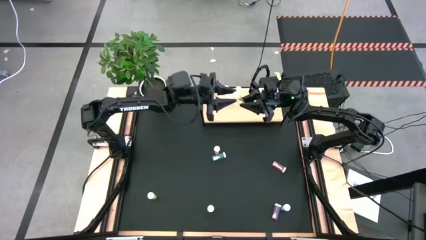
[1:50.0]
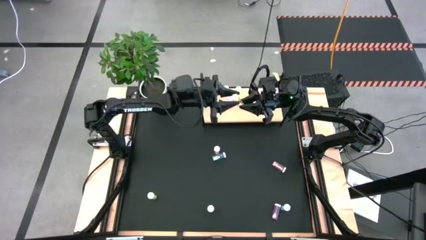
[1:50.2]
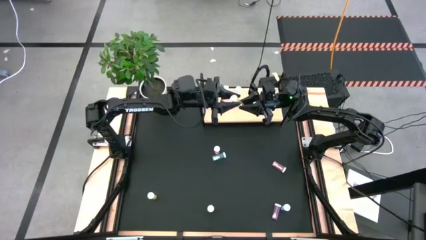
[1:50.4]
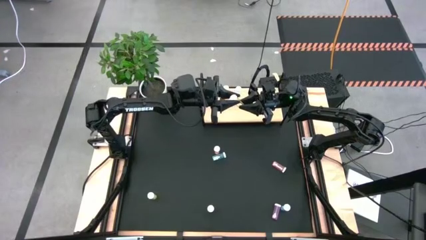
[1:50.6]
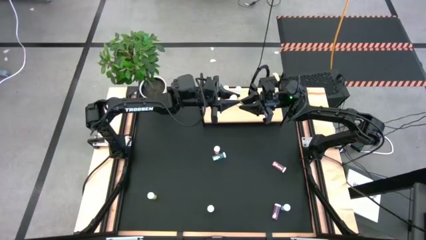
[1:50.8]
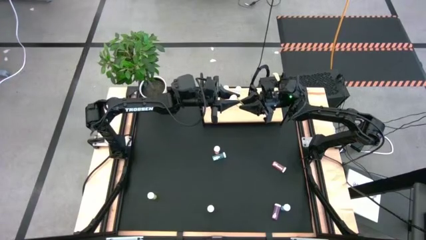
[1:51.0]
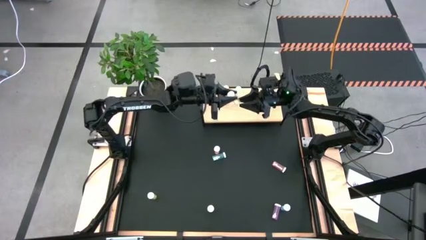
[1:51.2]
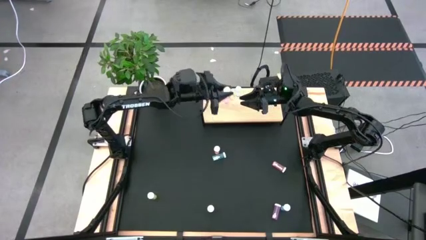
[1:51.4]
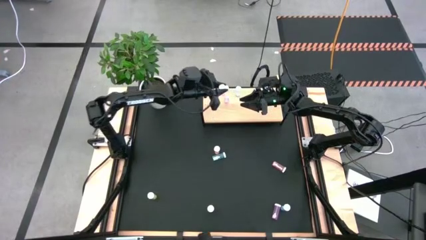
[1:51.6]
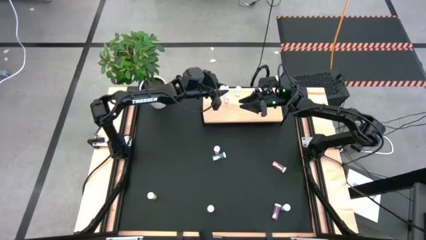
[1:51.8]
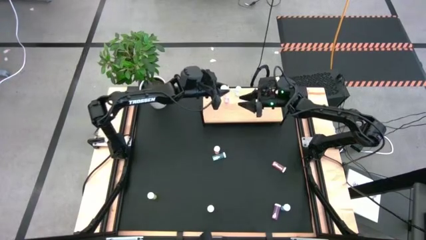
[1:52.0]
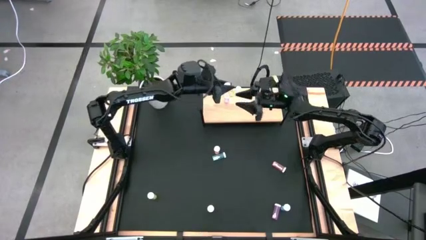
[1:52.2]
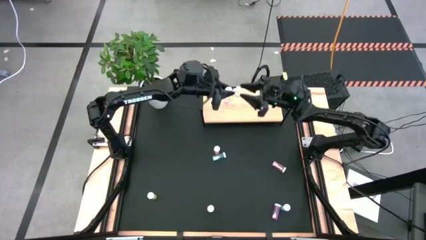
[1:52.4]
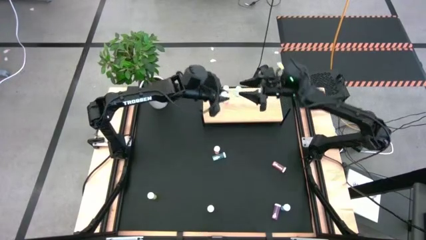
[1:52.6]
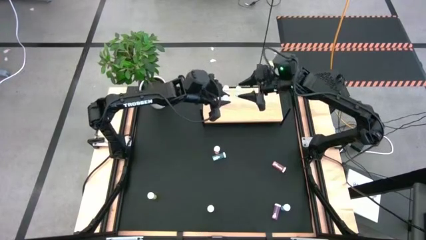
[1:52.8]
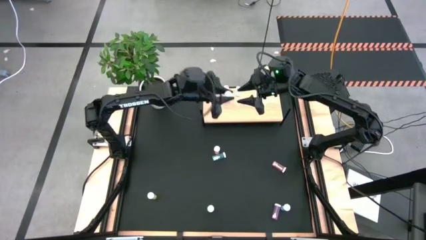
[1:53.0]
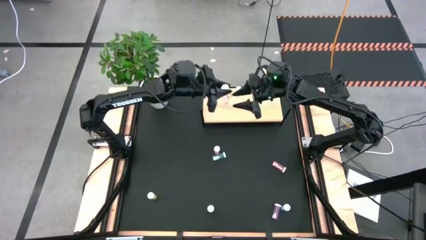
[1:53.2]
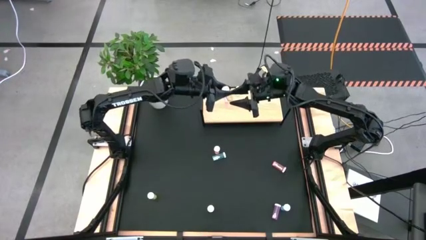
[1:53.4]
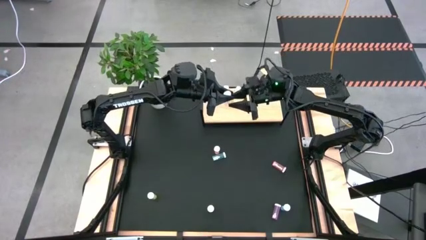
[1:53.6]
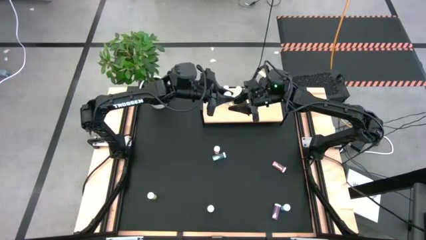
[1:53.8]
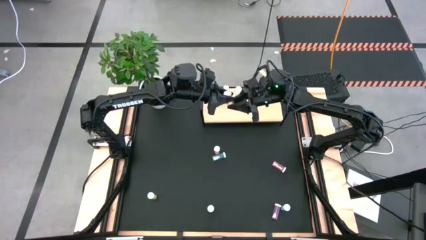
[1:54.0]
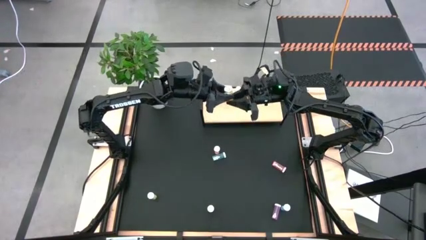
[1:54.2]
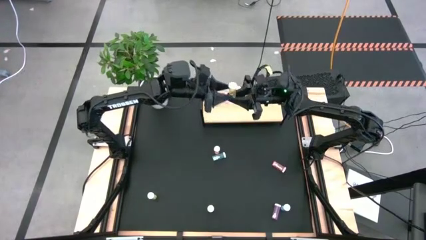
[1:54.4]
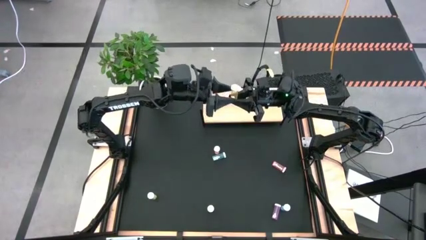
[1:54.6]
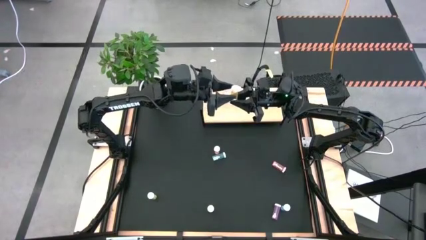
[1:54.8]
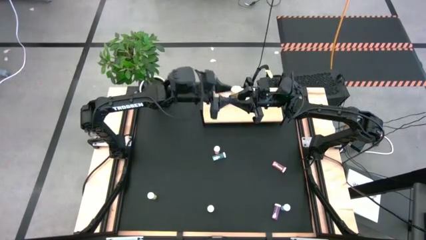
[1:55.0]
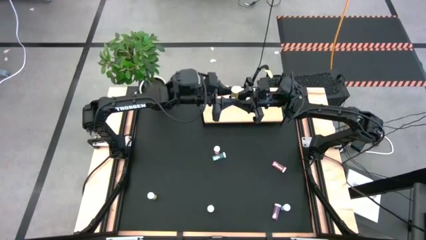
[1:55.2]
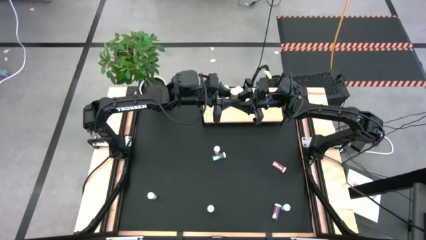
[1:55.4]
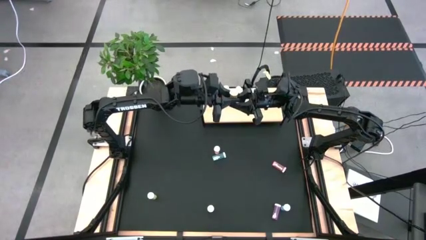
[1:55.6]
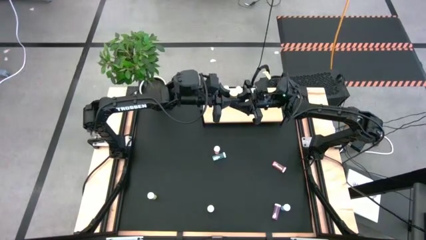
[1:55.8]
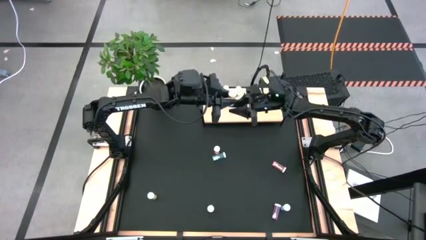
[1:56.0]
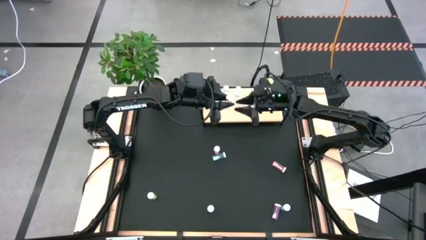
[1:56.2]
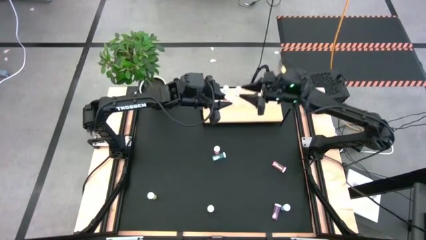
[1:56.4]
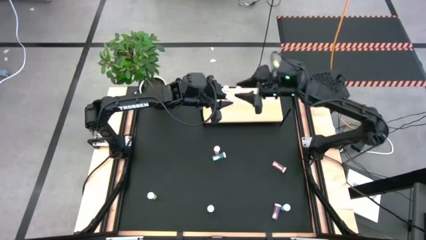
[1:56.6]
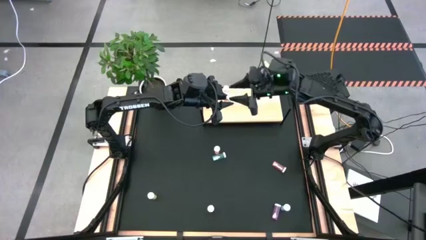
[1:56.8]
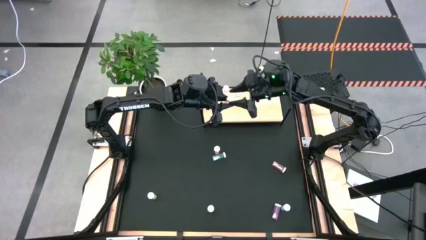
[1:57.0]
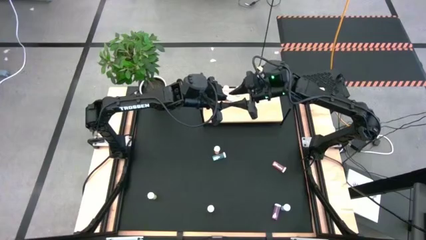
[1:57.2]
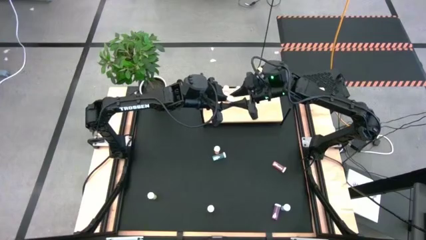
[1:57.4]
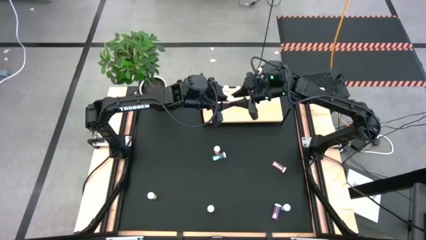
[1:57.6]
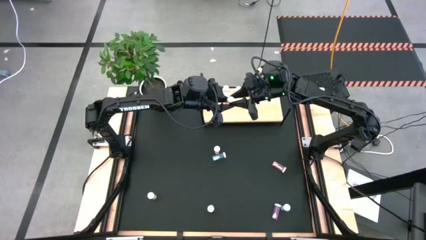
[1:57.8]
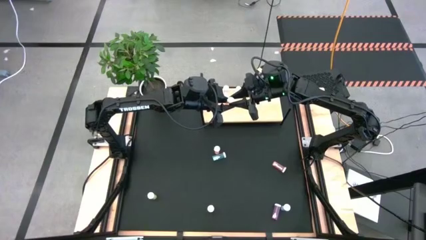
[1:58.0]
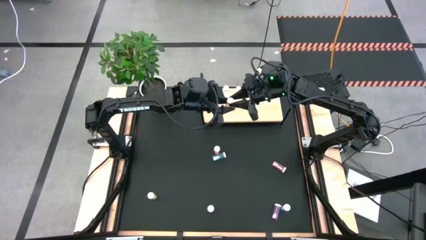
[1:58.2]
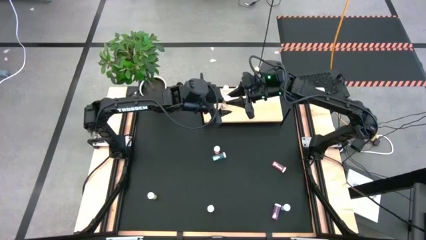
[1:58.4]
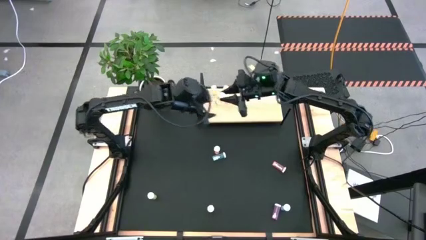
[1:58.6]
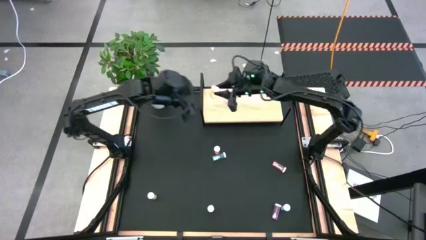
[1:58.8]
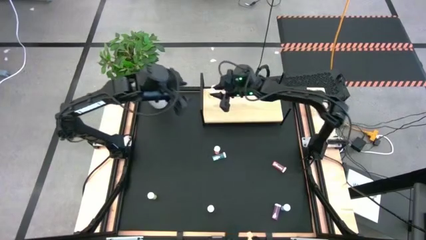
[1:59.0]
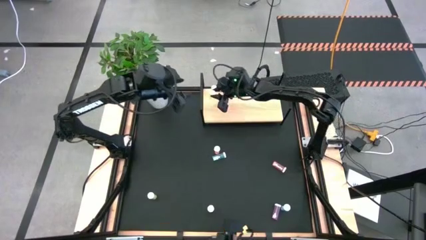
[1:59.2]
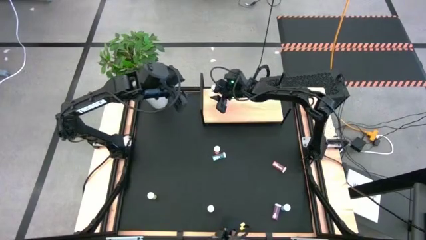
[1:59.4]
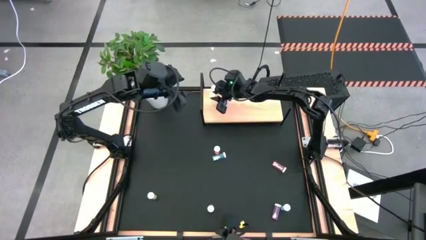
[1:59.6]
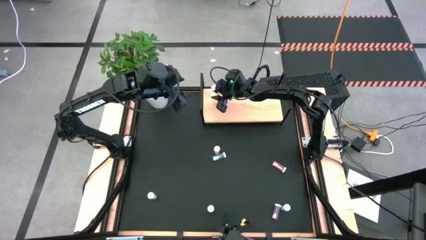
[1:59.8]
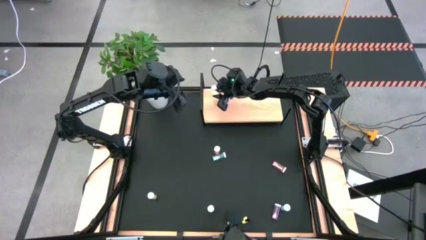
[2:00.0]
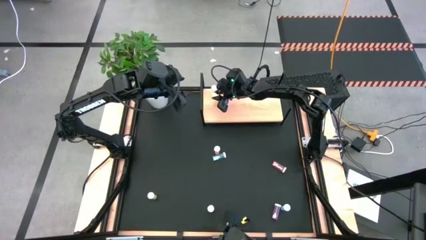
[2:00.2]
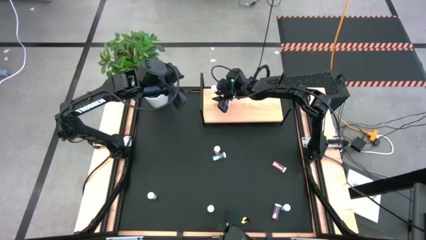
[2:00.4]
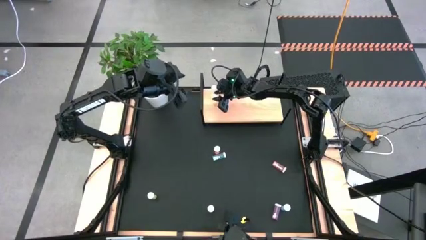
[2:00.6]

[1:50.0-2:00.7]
Task: Pick and place medicine bottles onto shelf by color
Put the right yellow pill bottle aligned with the other yellow pill bottle on the shelf

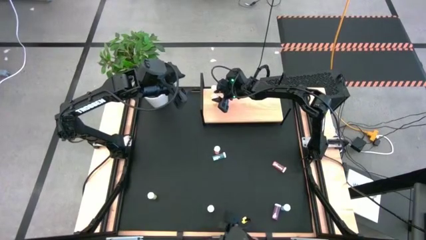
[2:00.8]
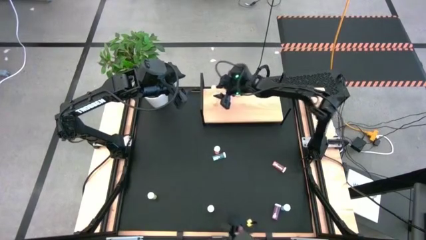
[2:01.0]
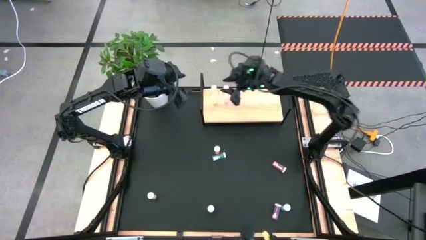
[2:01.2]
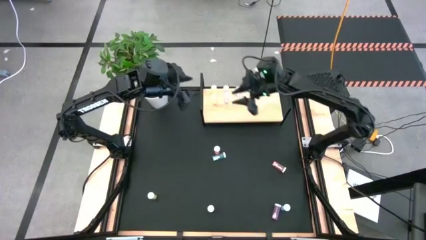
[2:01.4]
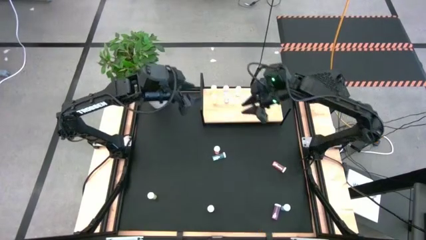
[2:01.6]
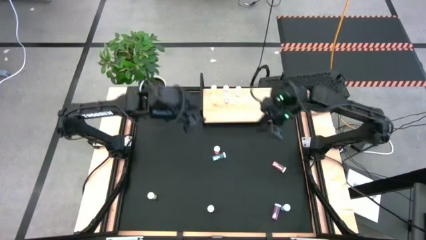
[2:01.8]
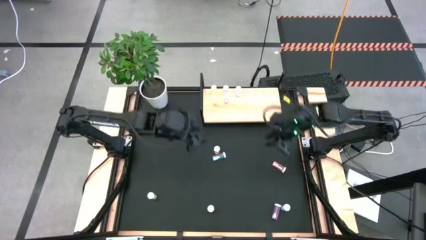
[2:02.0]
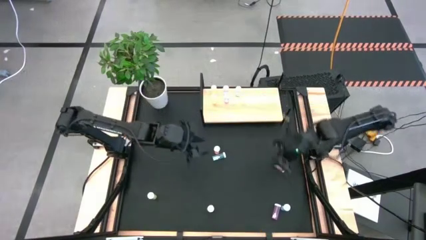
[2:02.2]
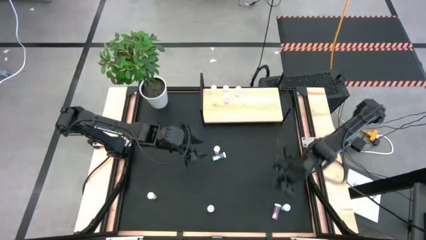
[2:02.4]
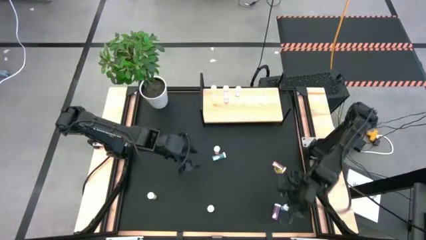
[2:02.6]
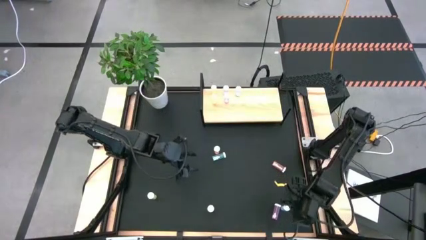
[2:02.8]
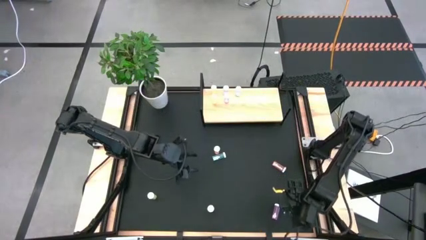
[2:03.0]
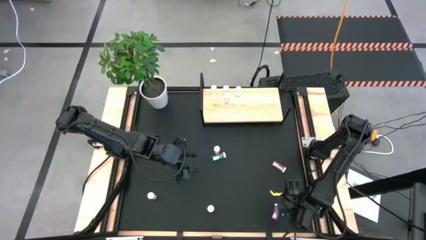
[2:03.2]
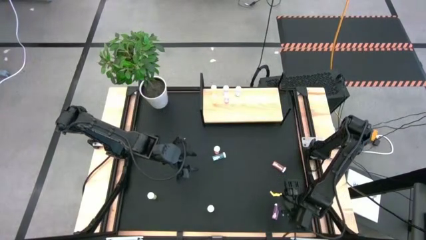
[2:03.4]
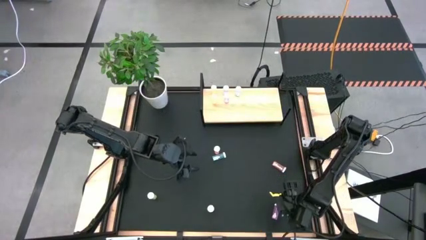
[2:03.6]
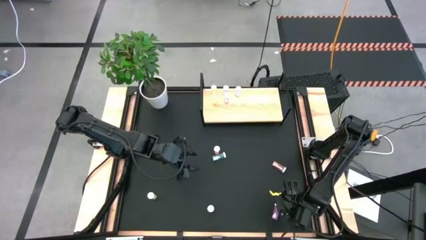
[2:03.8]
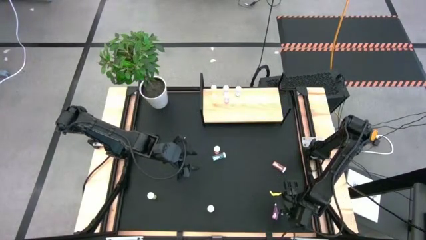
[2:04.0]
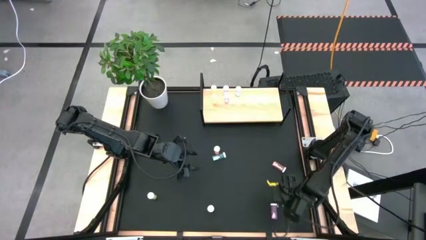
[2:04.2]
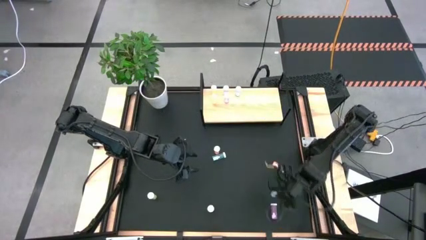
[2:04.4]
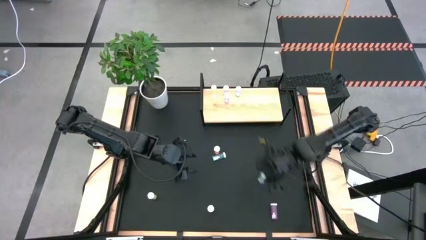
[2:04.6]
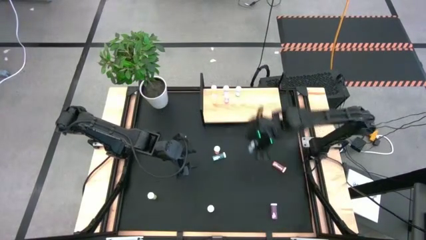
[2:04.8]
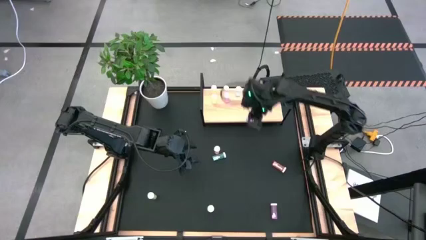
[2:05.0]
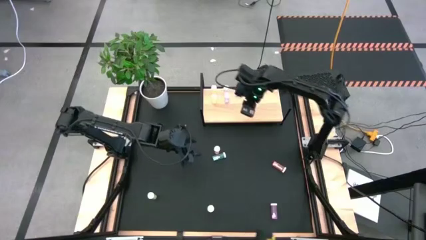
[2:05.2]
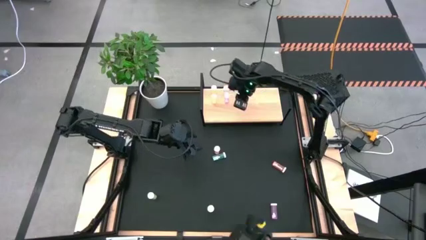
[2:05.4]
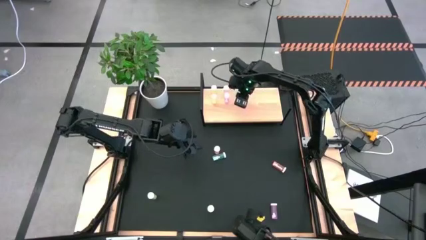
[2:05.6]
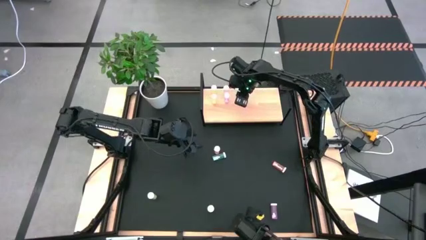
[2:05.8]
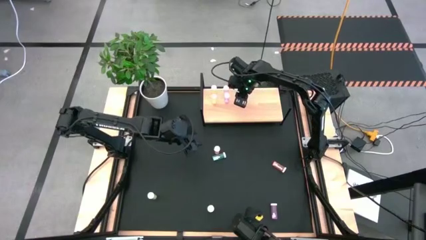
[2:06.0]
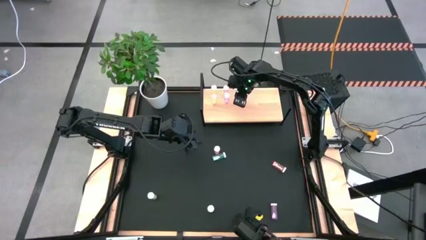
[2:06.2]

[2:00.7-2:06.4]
Put the bottom blue pill bottle on the shelf aligned with the other blue pill bottle

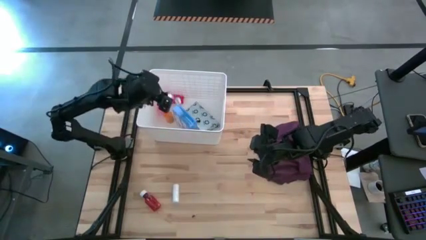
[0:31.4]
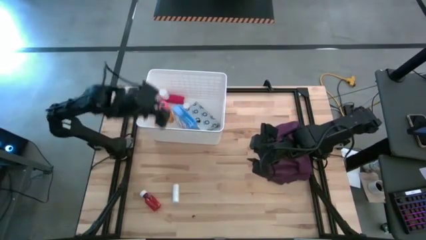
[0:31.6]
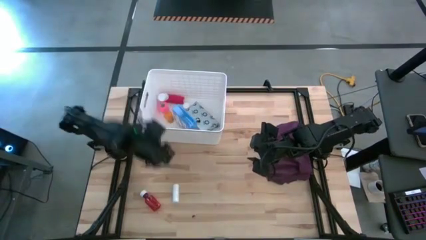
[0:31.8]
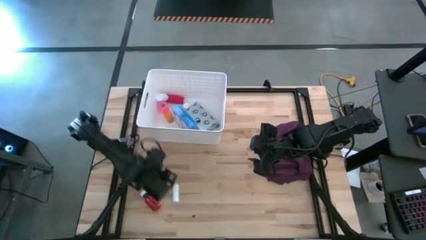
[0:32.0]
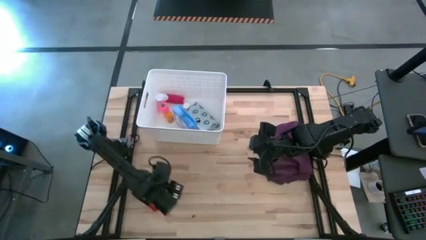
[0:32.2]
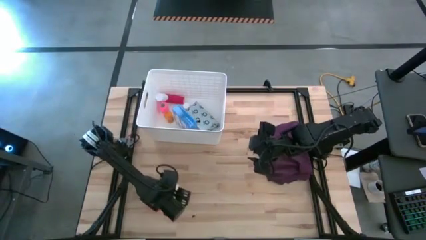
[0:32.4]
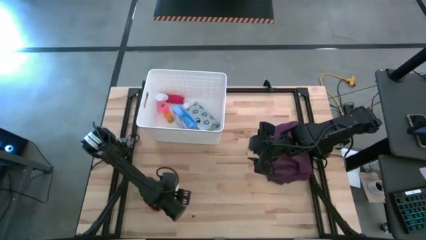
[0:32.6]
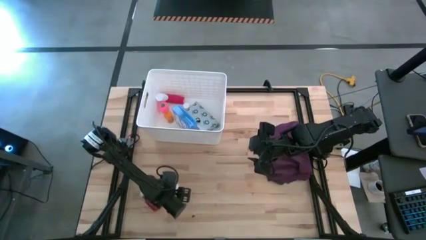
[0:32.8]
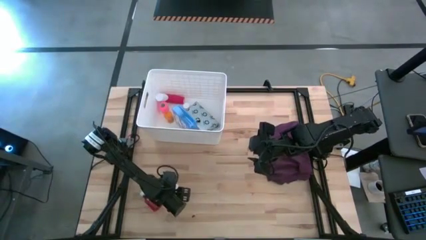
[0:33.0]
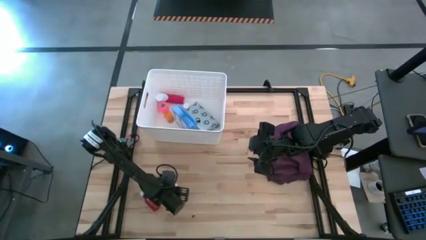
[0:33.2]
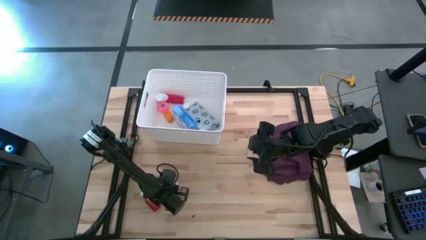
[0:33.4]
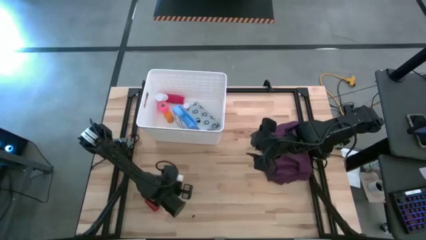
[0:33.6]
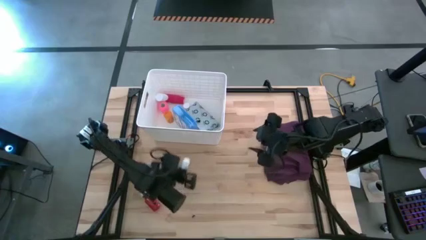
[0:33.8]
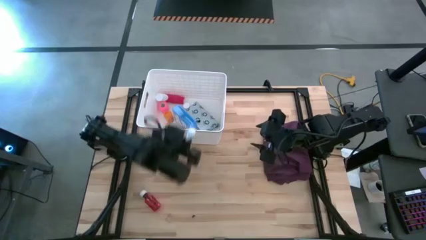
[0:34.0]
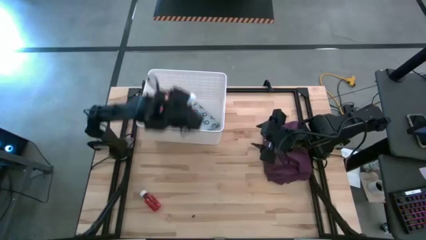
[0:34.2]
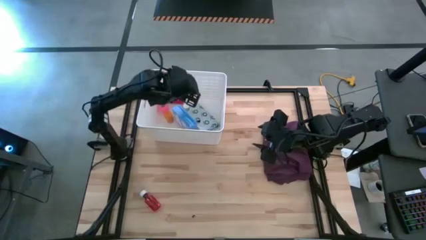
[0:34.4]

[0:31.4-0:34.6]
Task: Pick & place medical supplies in basket/bin
Put the rolled gauze into the white bin
